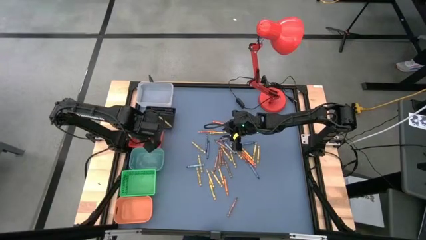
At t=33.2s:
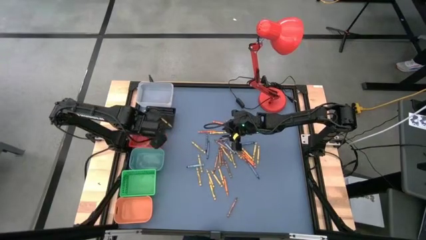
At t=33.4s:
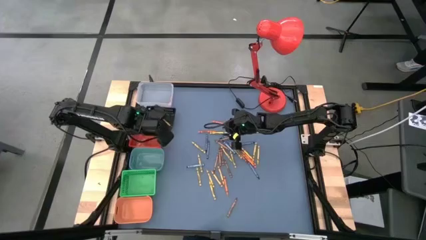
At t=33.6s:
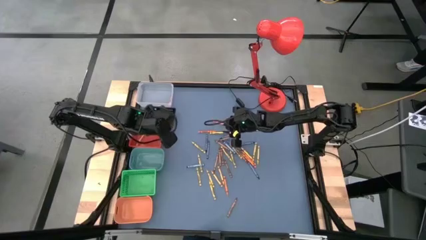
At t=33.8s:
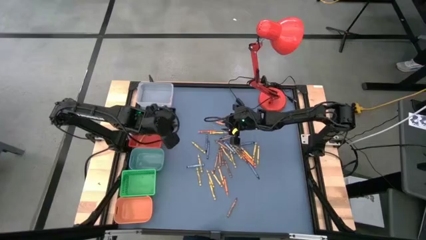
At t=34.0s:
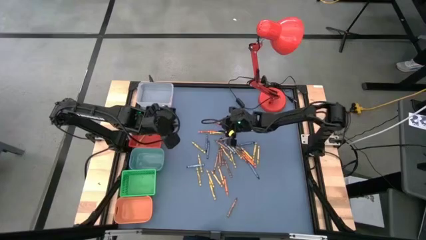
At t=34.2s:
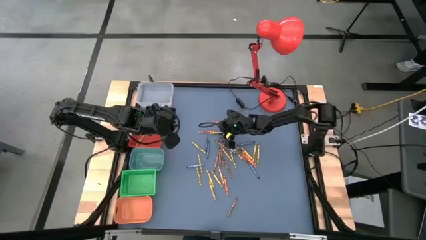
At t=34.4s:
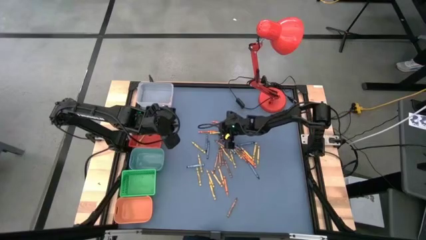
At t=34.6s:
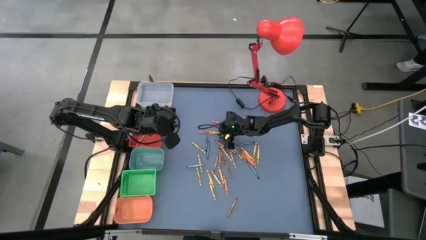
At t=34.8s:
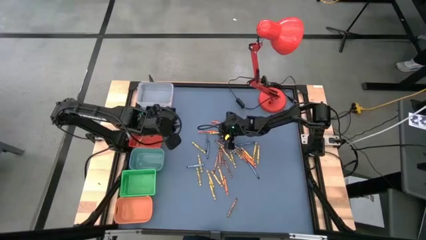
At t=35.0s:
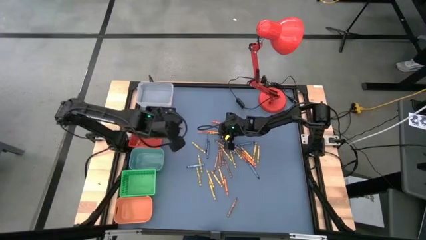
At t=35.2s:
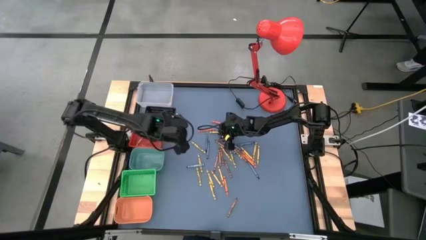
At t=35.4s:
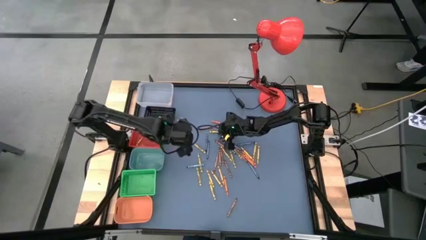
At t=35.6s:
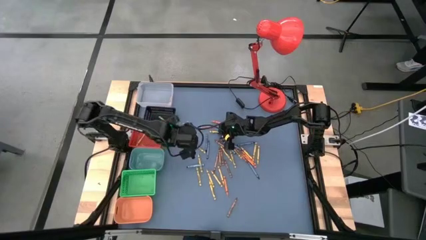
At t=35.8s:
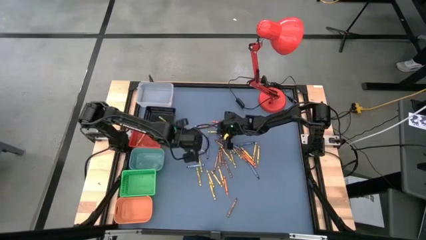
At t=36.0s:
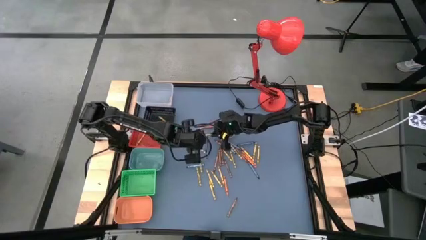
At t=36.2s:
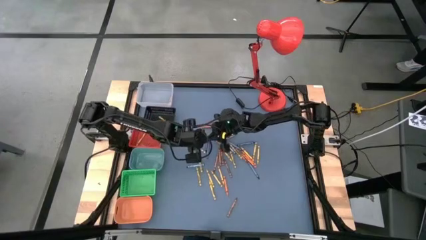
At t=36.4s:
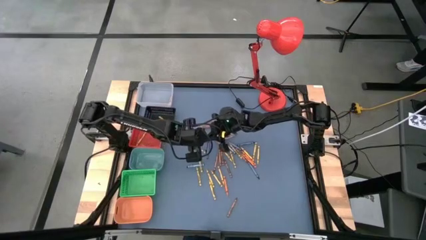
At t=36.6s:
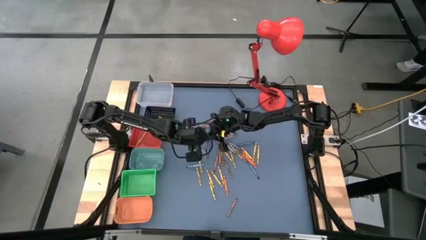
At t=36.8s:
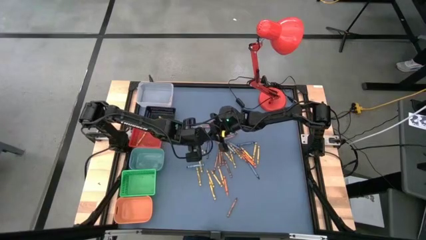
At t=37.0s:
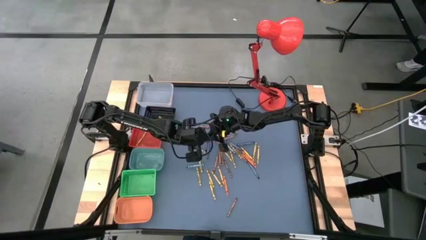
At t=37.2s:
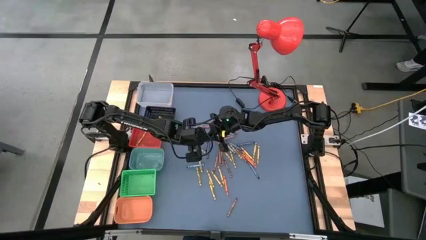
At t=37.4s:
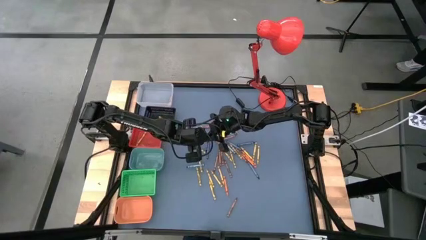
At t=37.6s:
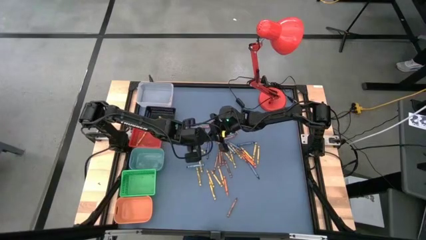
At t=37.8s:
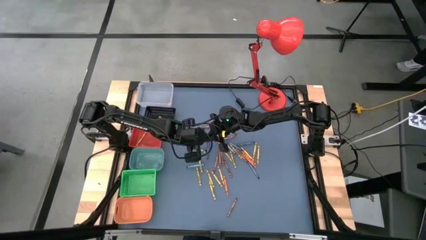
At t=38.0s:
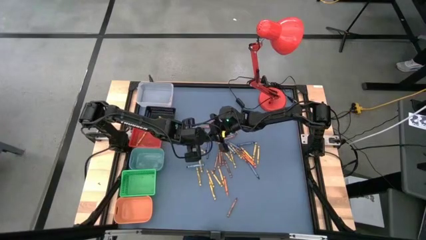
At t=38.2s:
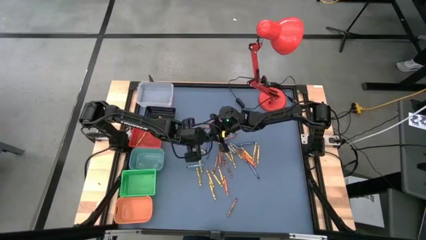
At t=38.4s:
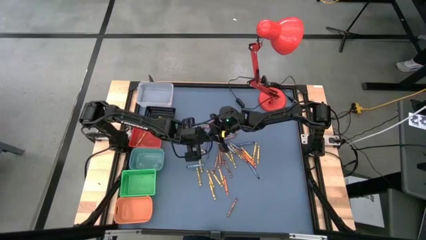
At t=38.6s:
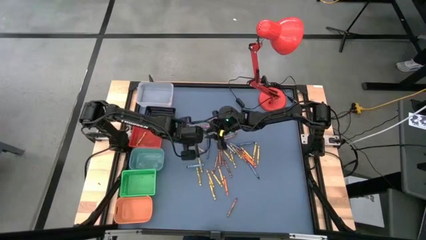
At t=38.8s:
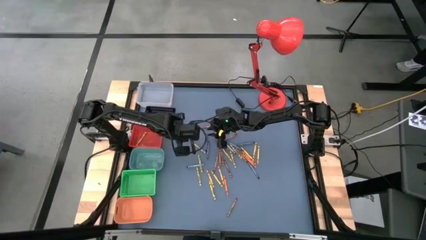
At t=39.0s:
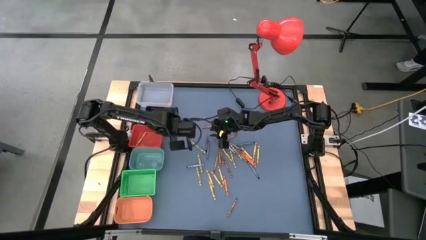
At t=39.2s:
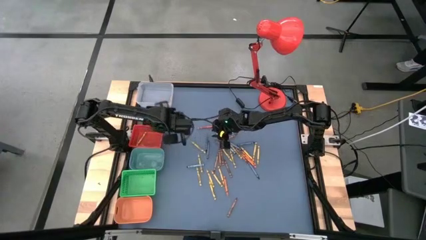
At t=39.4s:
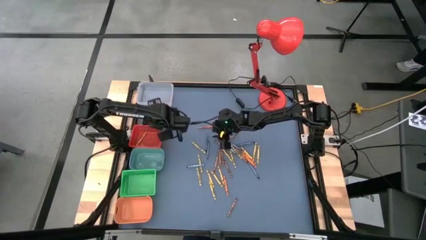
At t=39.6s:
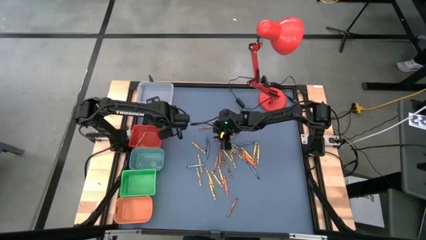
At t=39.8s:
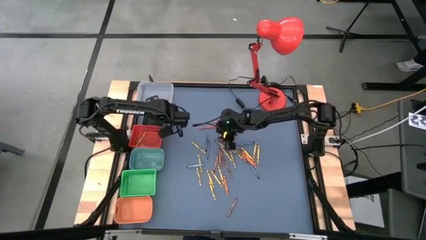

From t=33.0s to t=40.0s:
Task: Sort crayons
Put the green crayon into the black bin

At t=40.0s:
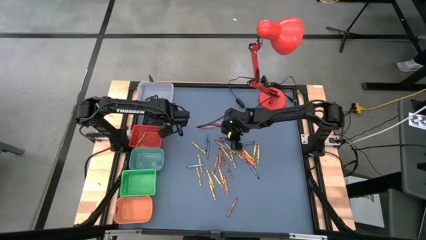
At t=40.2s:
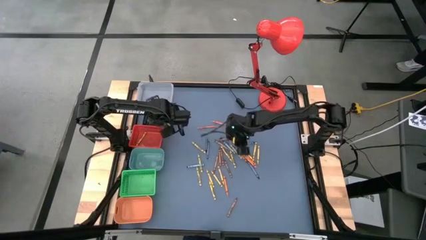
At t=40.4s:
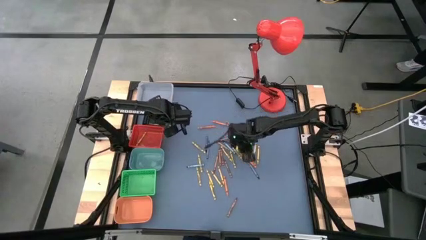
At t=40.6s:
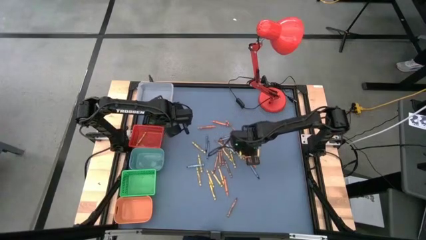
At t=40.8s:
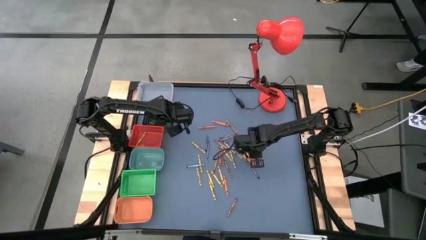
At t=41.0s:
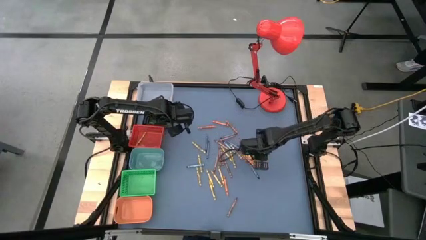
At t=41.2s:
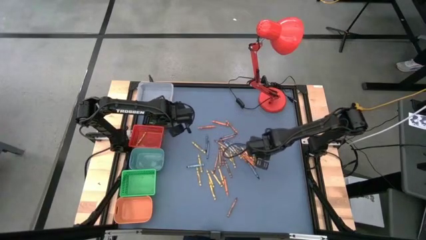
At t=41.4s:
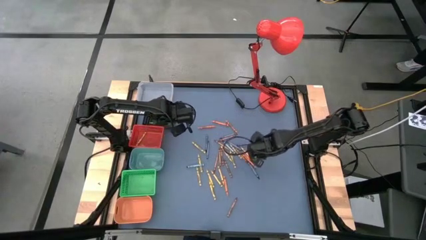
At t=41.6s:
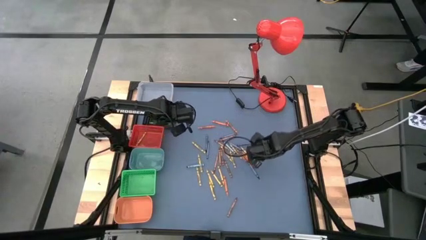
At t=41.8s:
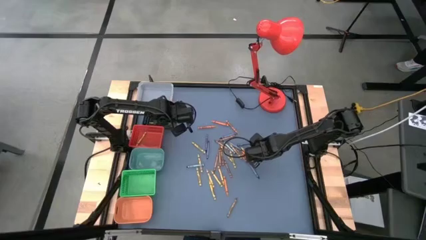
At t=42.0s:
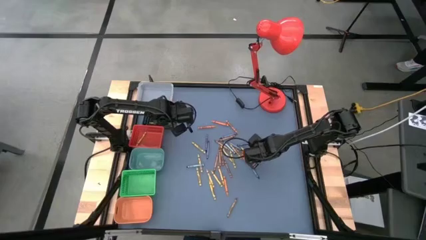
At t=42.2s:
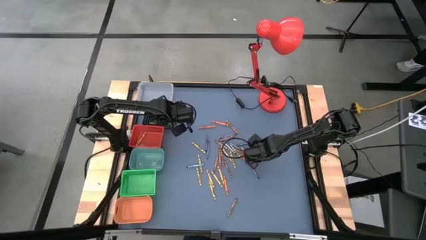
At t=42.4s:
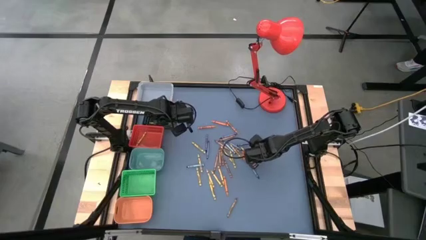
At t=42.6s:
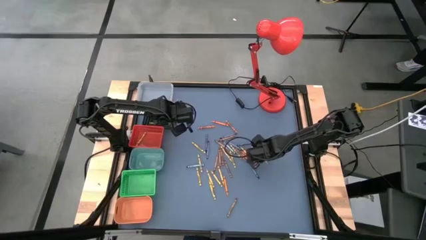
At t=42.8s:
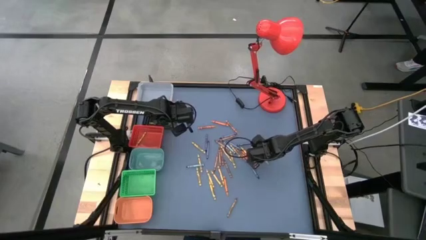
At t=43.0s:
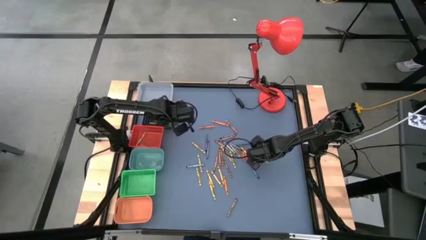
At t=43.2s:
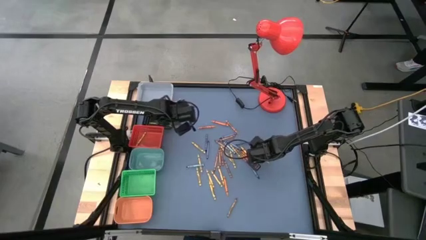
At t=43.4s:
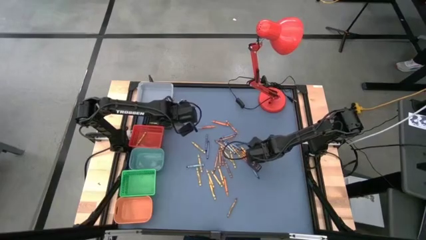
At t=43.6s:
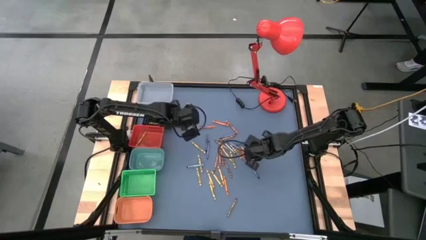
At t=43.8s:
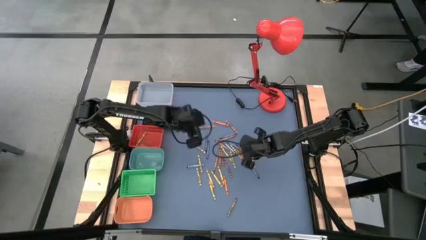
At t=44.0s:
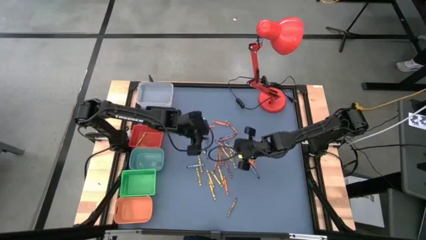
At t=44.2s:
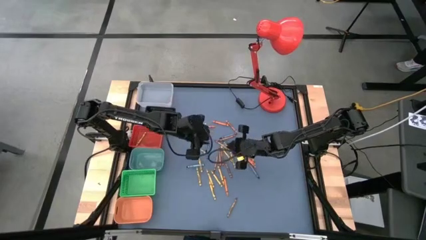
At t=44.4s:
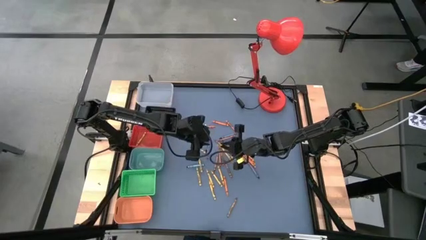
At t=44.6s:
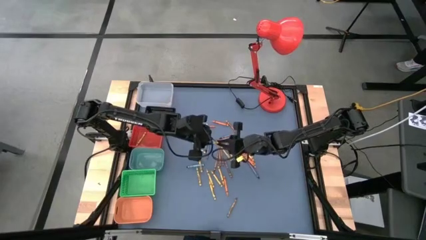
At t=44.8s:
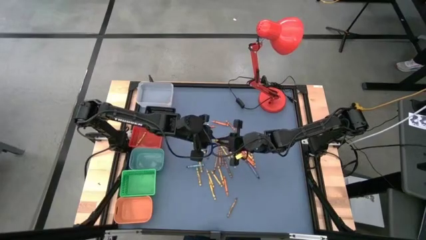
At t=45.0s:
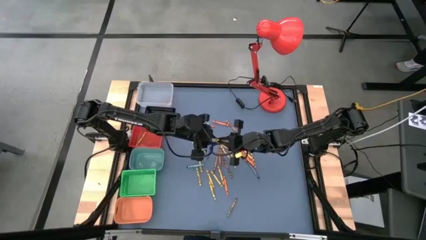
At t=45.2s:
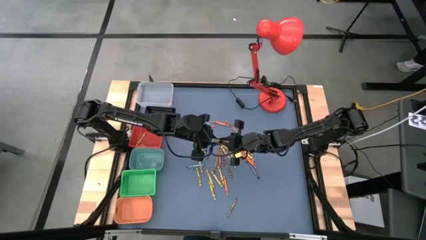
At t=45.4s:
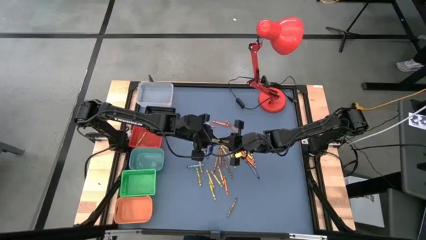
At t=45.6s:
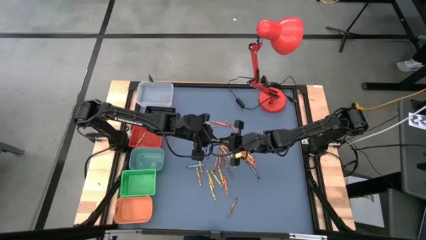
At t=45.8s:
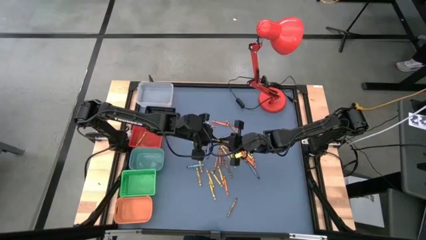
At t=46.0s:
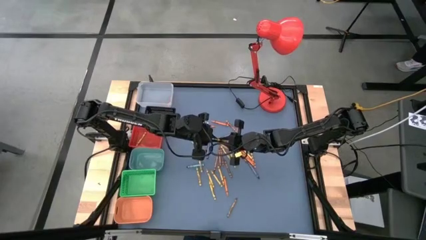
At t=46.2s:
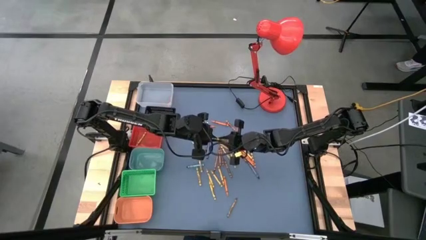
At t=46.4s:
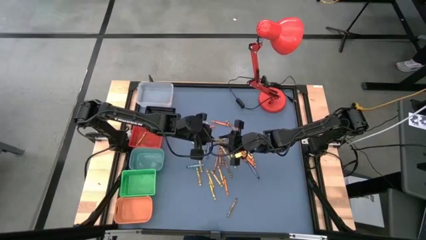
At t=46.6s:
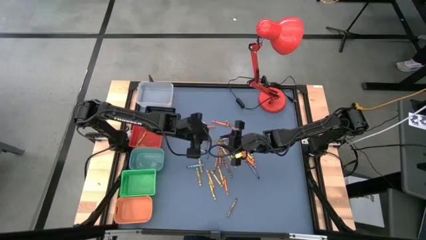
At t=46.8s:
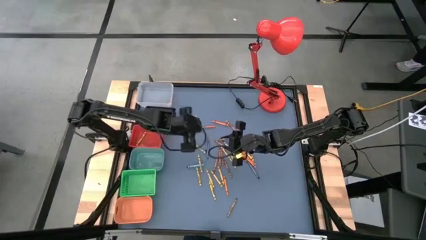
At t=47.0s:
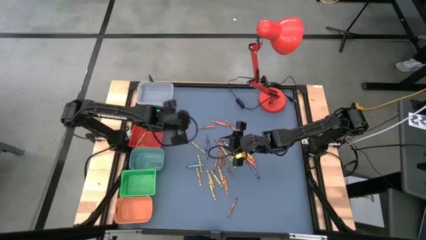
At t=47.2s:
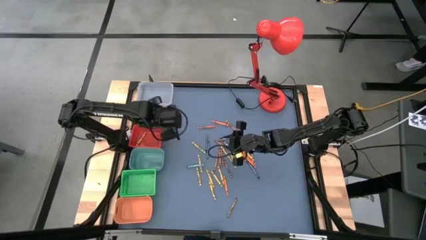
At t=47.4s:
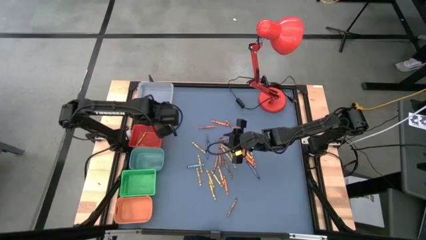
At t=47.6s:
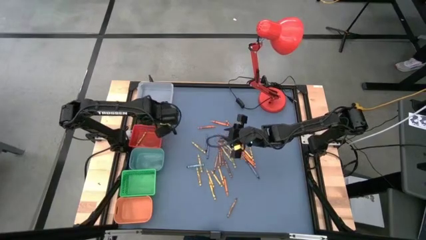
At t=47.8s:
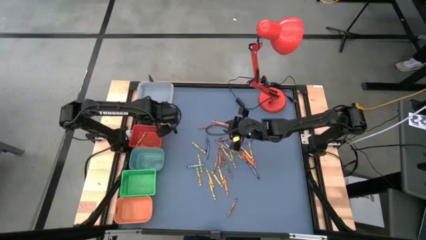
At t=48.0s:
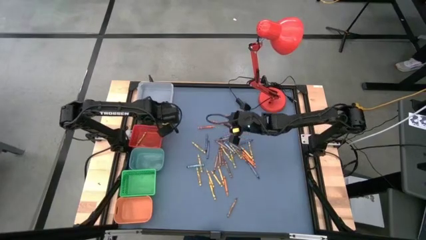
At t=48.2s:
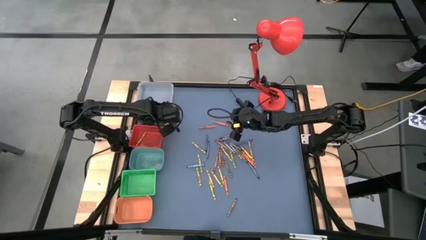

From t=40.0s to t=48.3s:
Put the green crayon into the black bin
